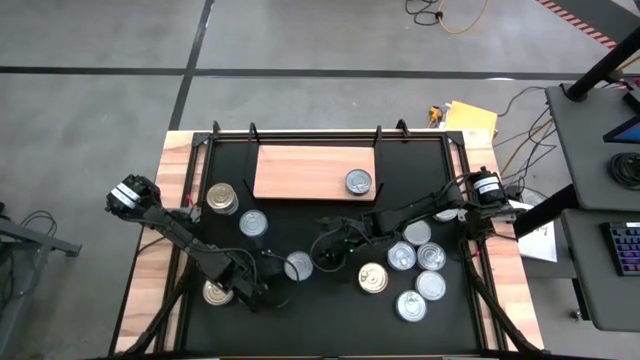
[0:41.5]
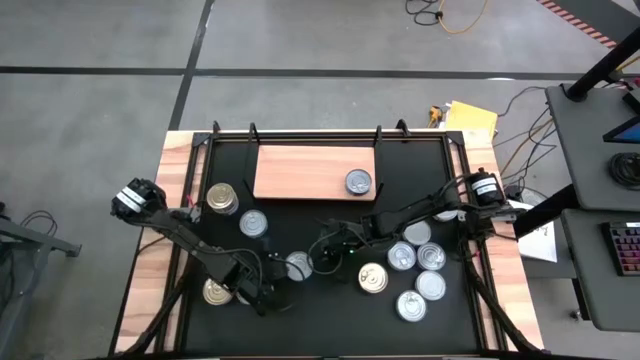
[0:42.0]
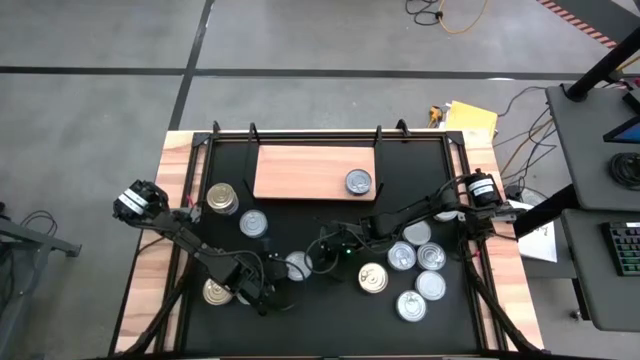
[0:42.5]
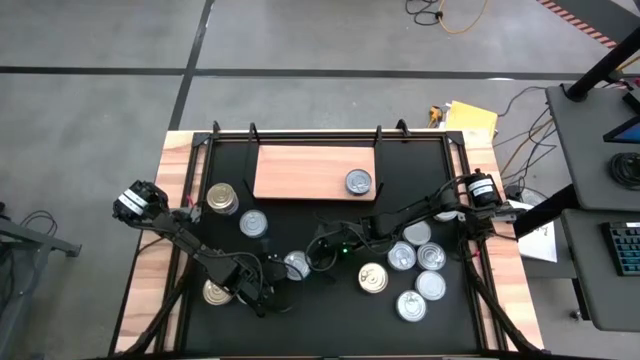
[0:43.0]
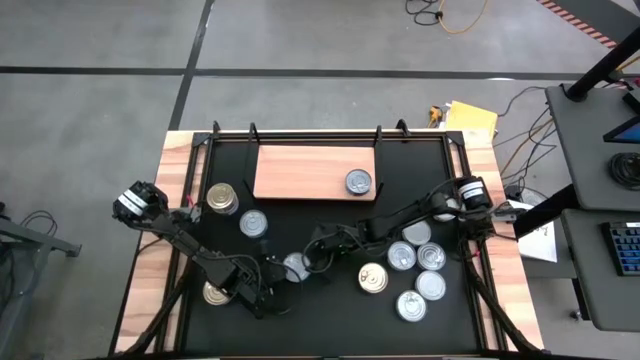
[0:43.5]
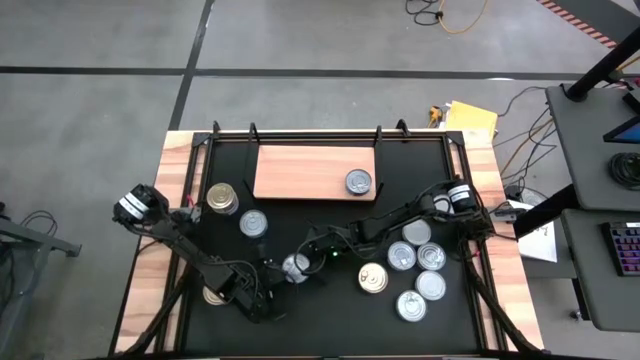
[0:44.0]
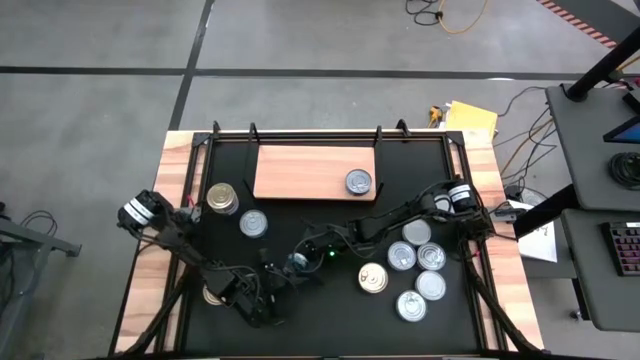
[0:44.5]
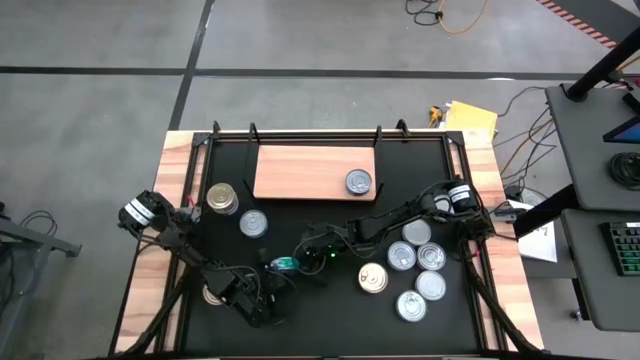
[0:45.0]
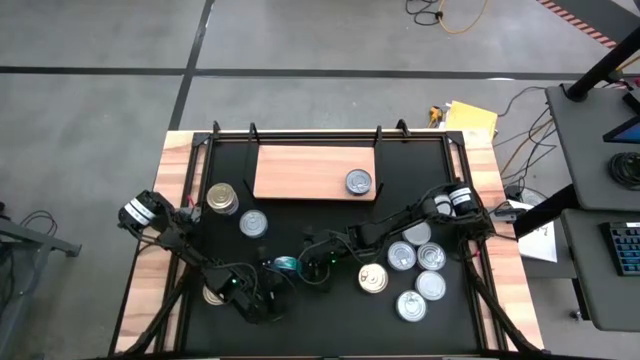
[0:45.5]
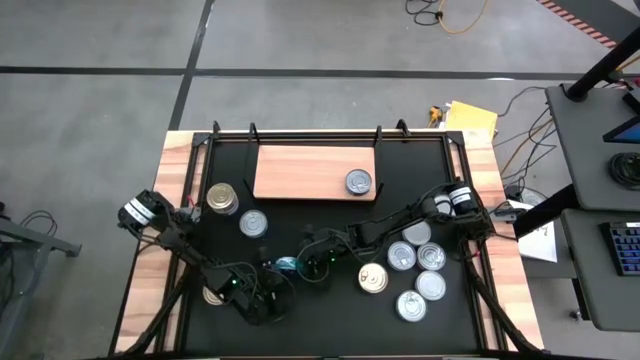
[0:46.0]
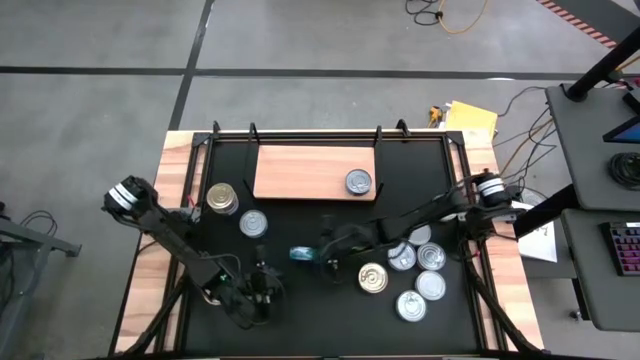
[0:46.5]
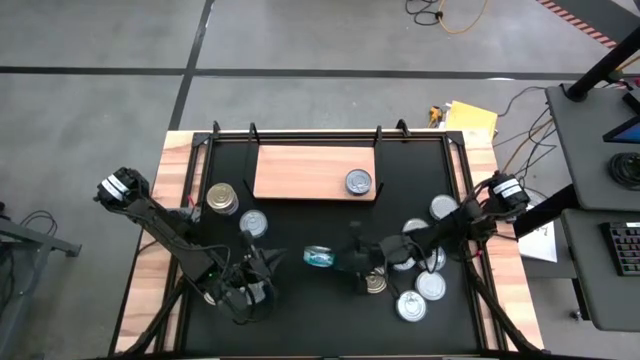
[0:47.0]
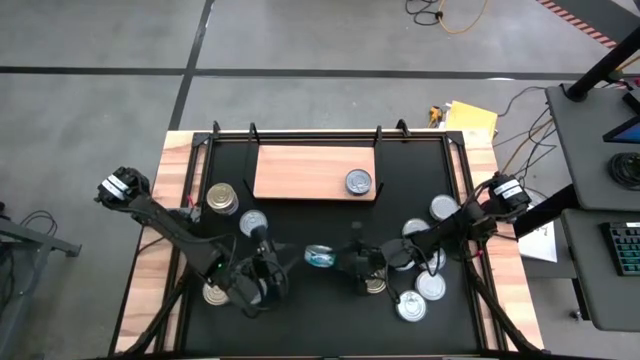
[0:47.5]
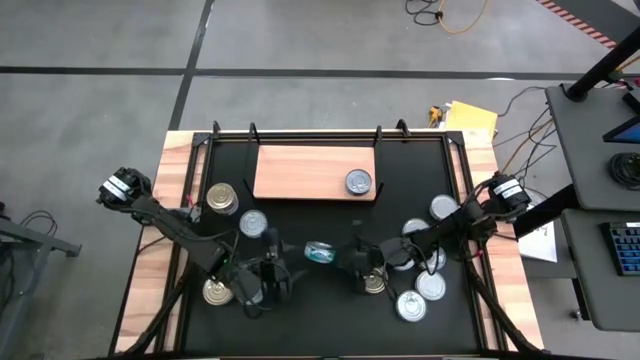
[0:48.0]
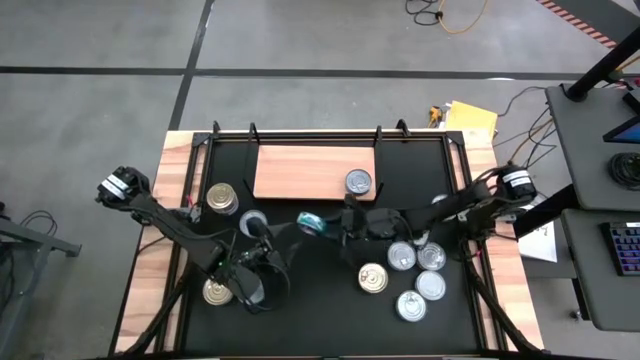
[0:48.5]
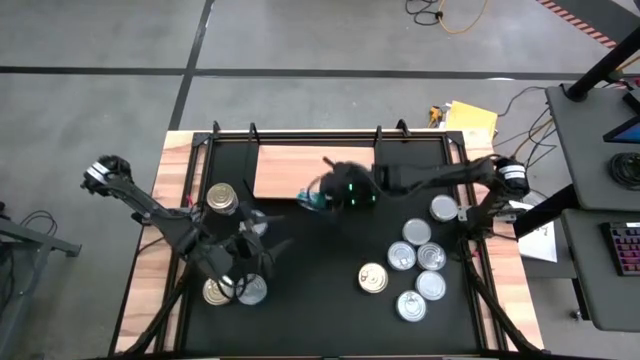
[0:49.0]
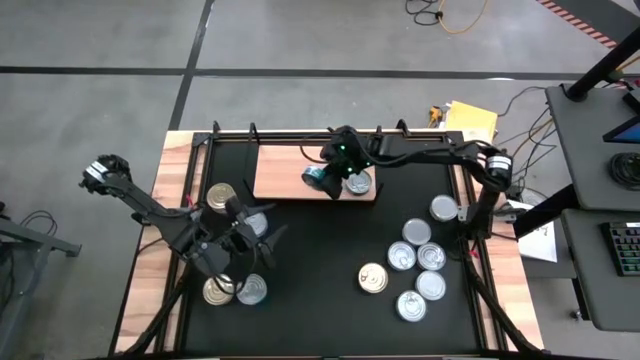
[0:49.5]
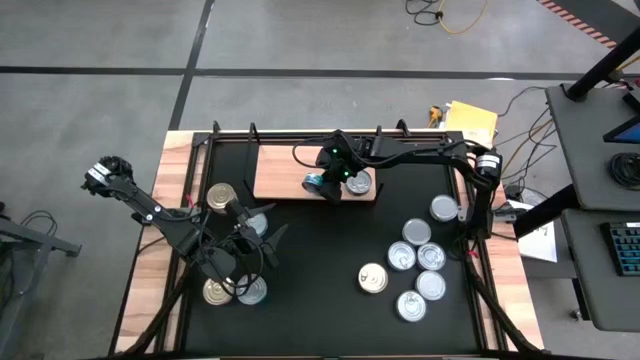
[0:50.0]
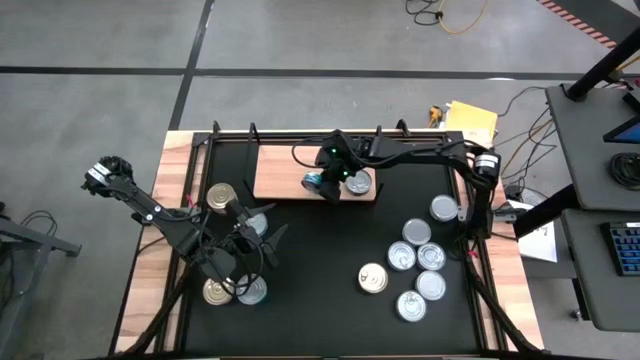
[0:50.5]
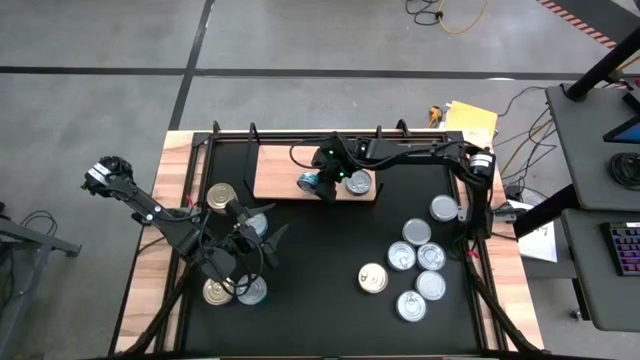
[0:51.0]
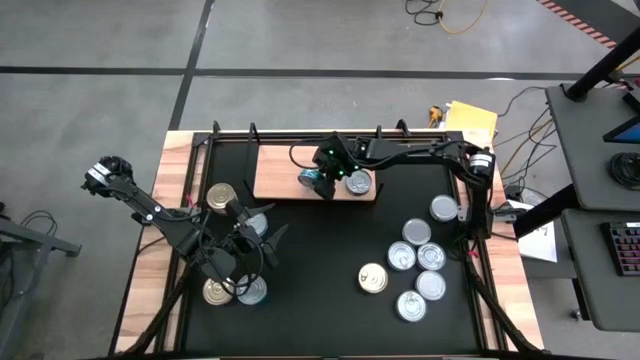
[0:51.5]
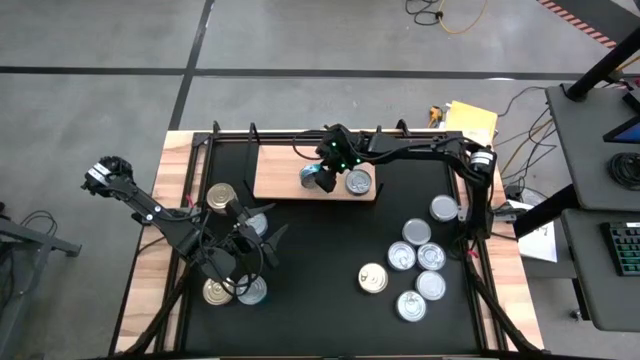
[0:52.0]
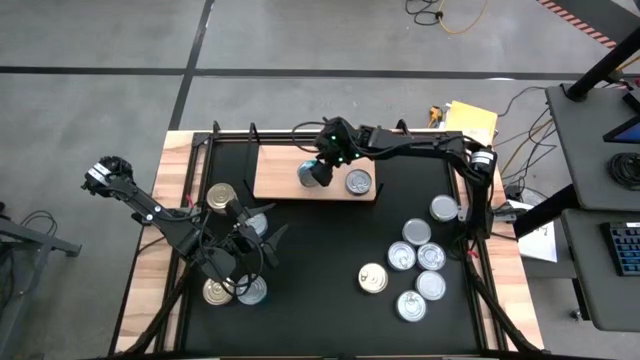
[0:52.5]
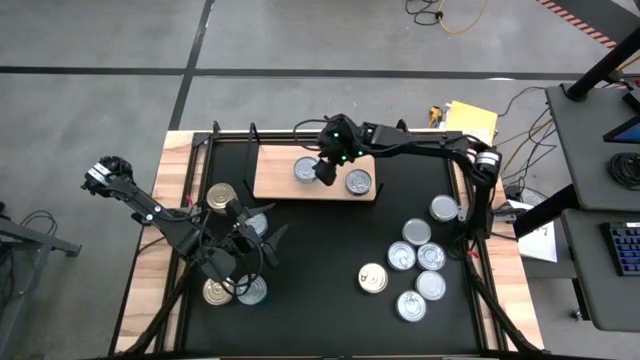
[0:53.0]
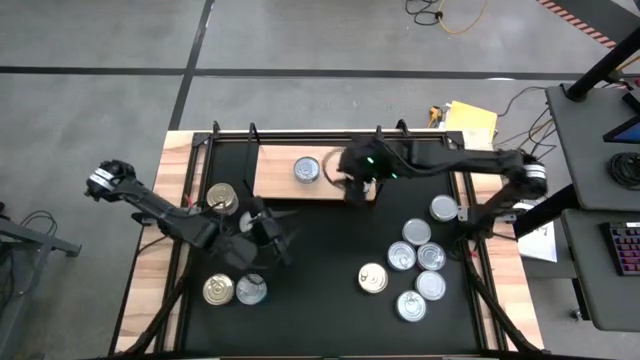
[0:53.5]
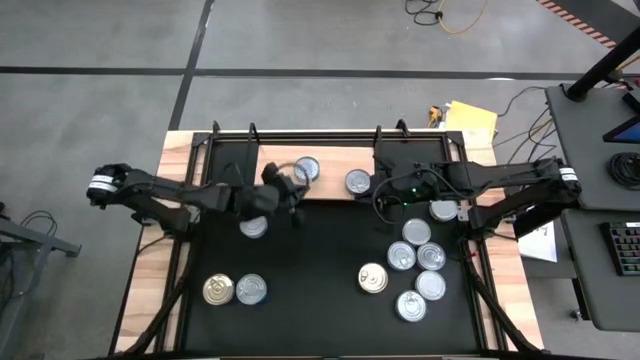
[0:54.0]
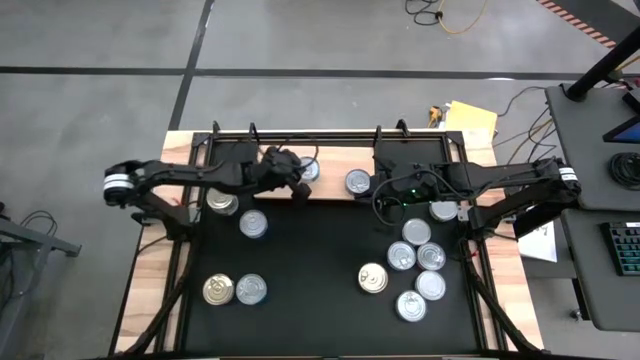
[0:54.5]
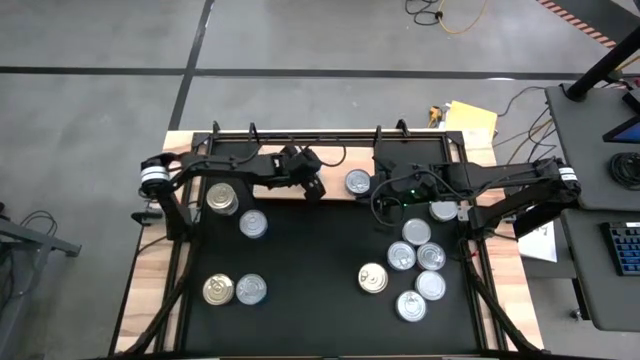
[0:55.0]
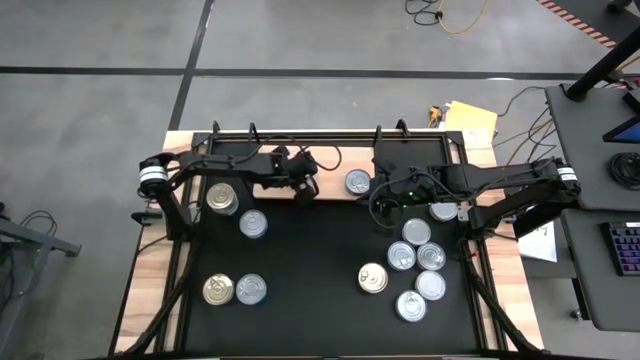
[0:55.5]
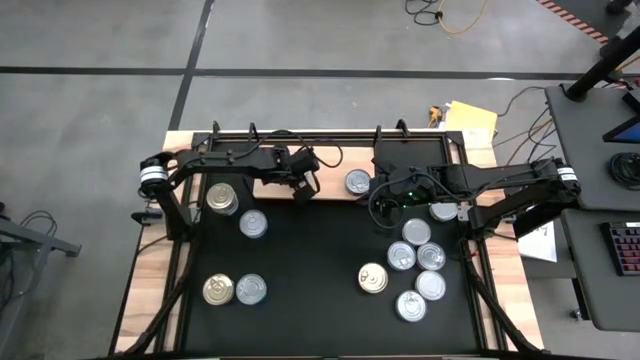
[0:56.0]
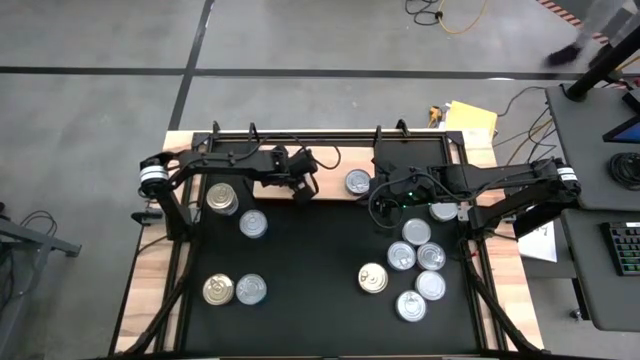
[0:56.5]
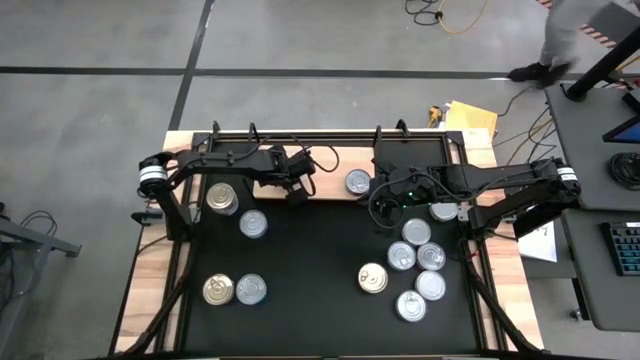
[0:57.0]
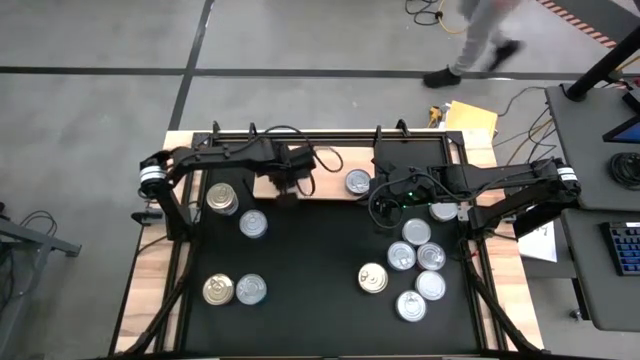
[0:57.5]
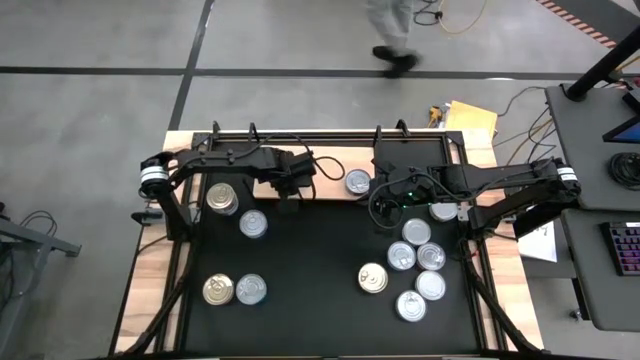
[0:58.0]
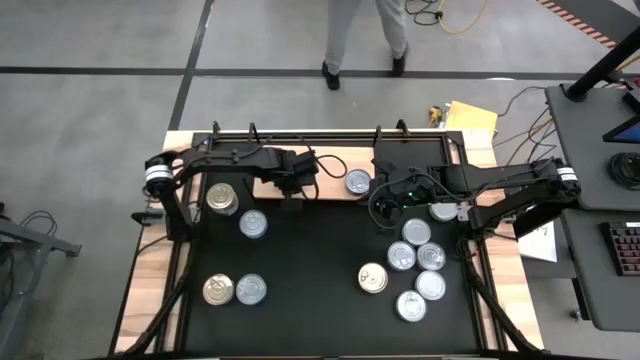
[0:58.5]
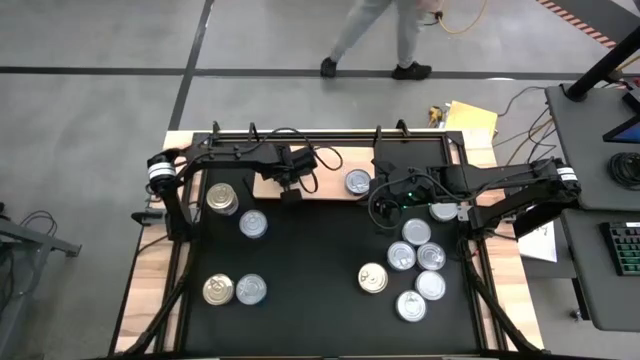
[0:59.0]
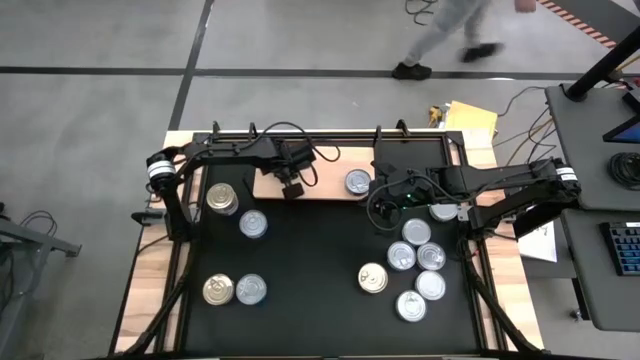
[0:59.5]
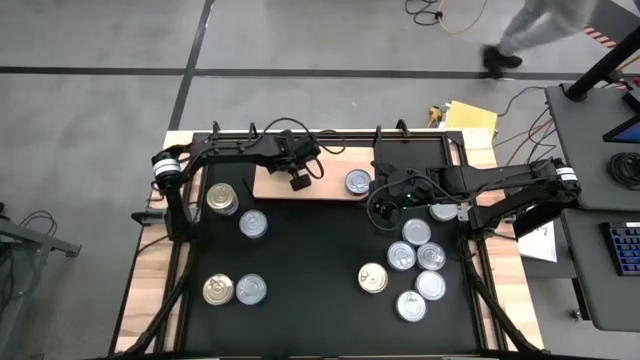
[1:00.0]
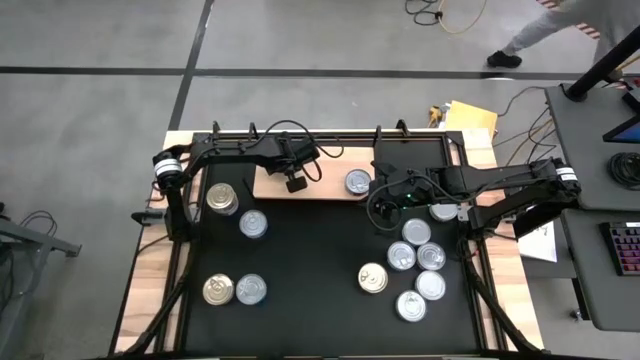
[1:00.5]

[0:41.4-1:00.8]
Task: Stack canned seafood by type on shelf
Put the green tuna can on the shelf

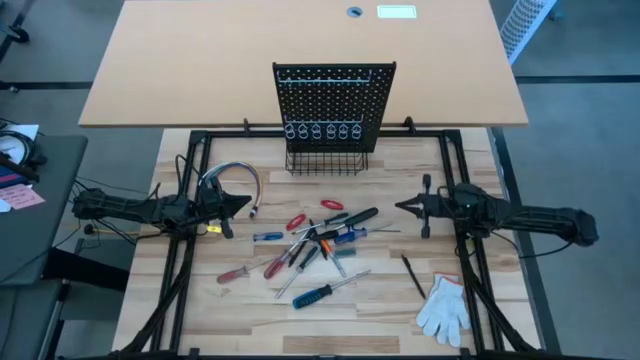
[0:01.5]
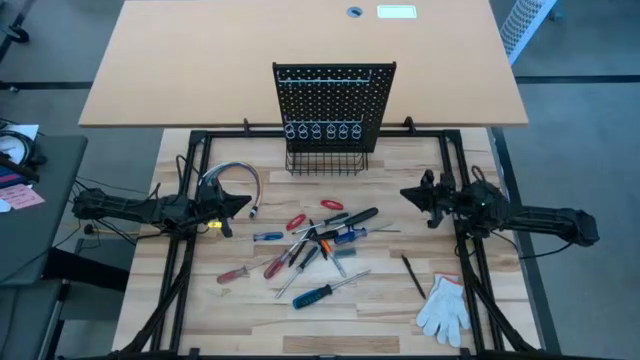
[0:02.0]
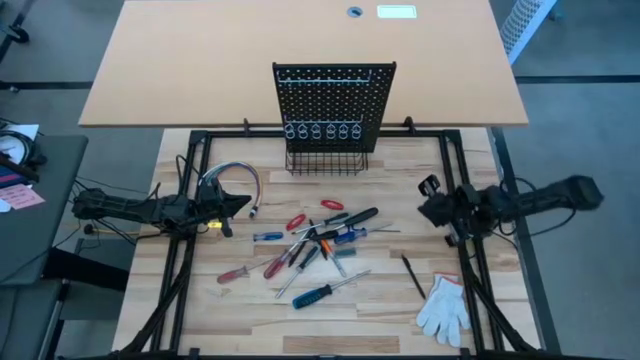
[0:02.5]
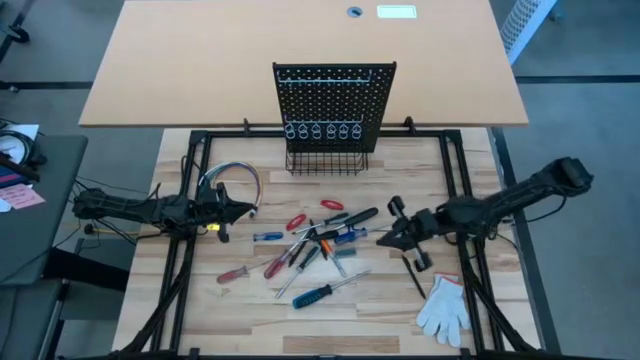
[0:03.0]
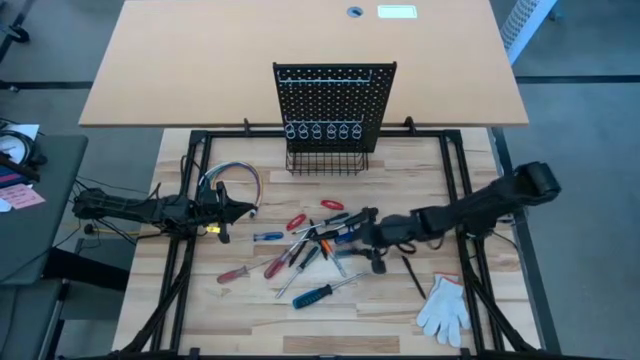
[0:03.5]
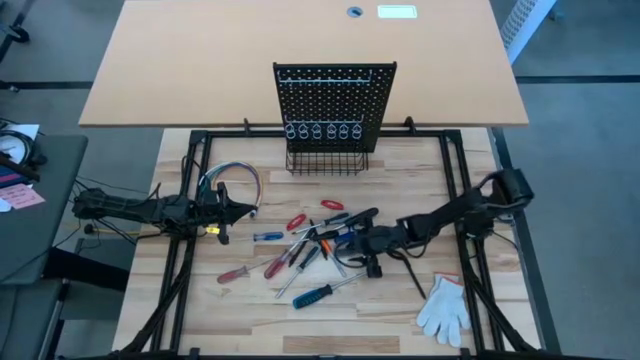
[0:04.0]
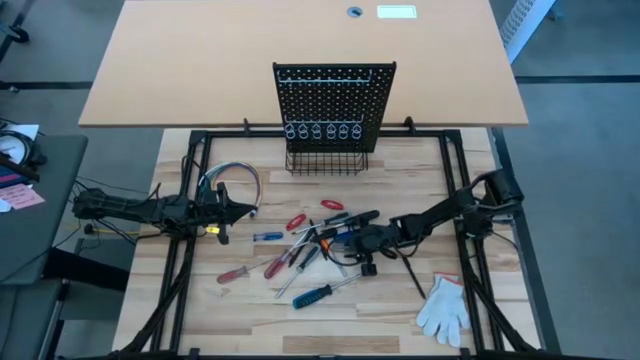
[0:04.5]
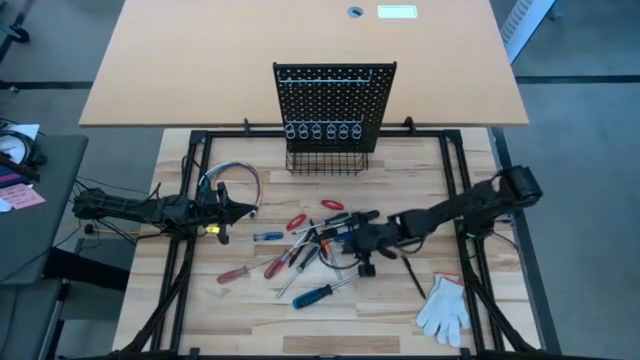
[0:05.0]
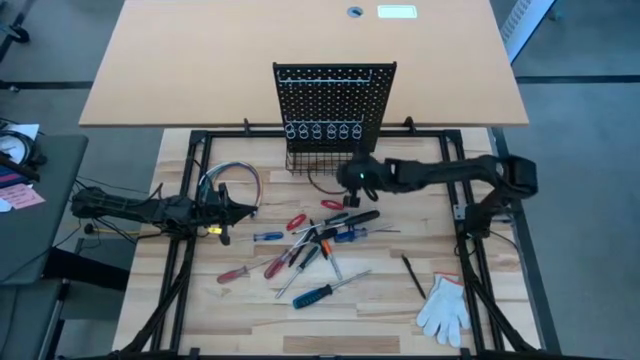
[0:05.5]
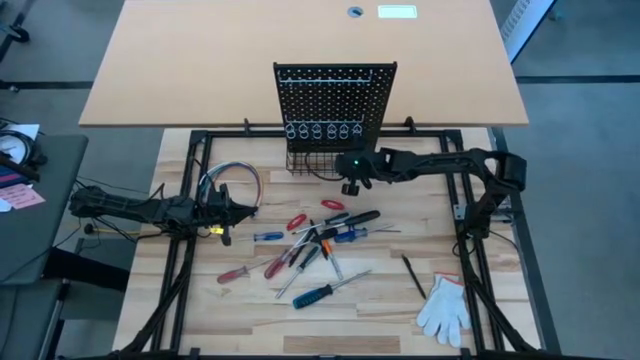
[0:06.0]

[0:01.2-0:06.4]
Task: Hang tools onto peg board
Put the cutter blades into the wire basket on the pegboard
